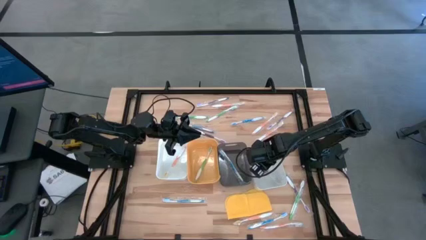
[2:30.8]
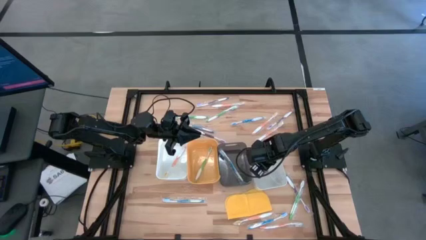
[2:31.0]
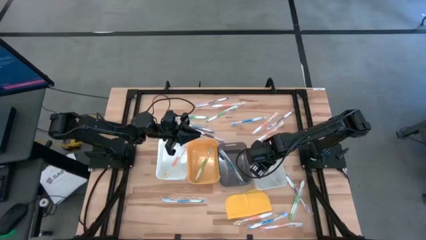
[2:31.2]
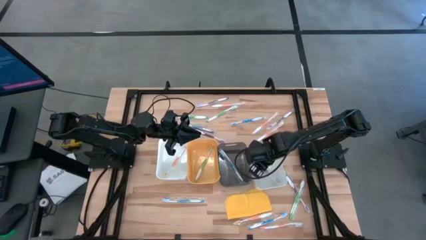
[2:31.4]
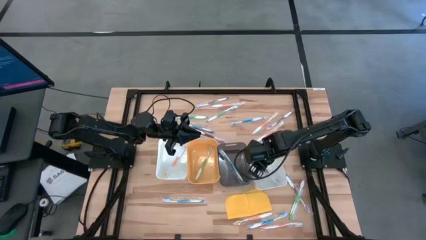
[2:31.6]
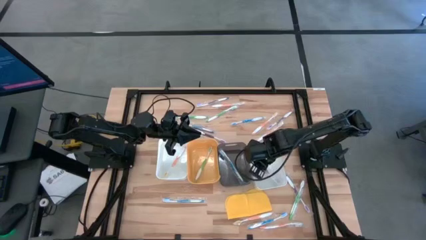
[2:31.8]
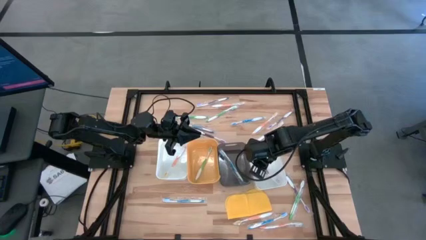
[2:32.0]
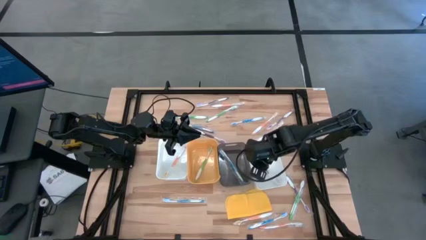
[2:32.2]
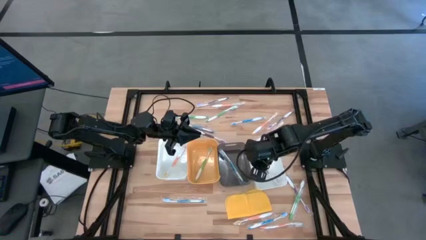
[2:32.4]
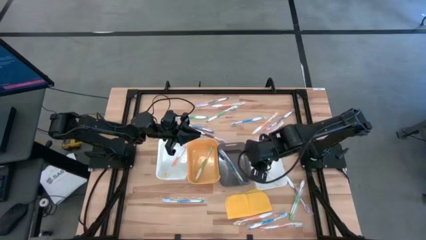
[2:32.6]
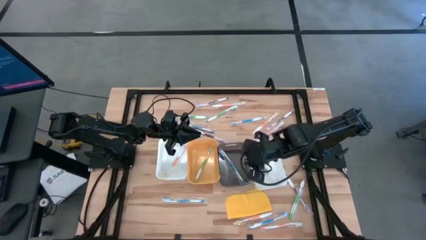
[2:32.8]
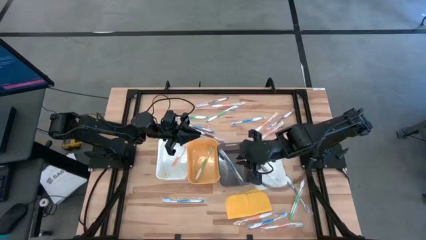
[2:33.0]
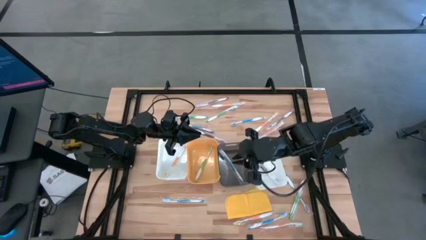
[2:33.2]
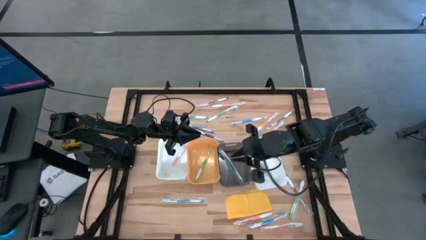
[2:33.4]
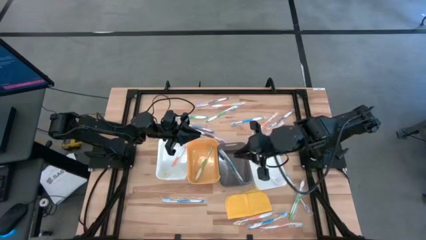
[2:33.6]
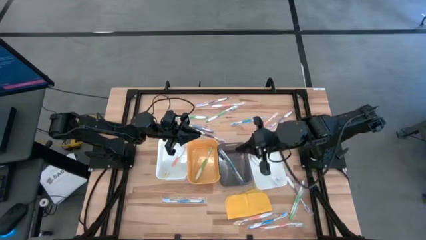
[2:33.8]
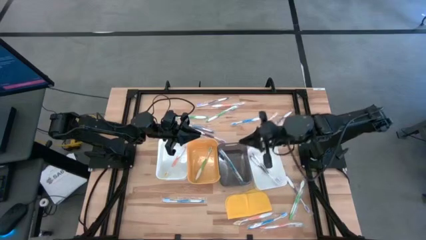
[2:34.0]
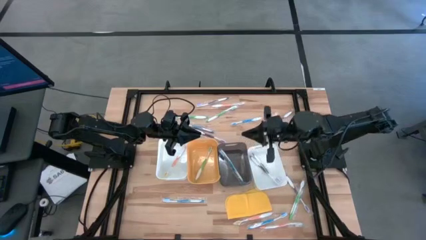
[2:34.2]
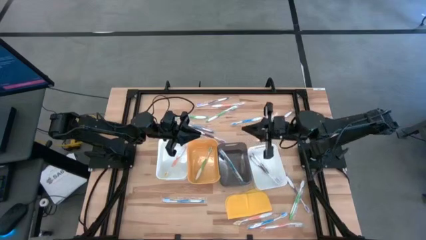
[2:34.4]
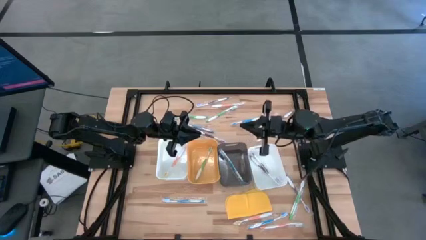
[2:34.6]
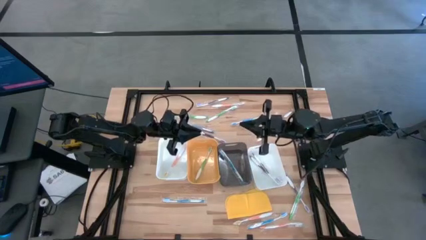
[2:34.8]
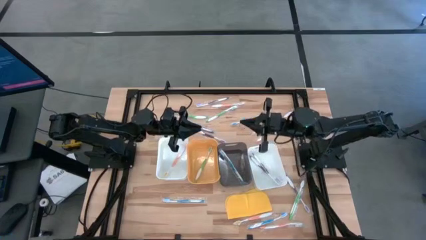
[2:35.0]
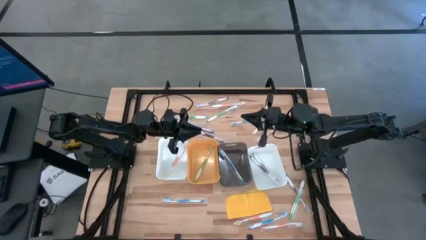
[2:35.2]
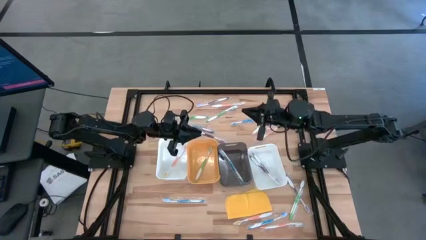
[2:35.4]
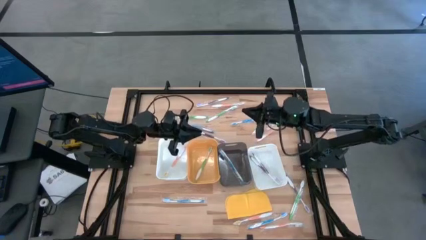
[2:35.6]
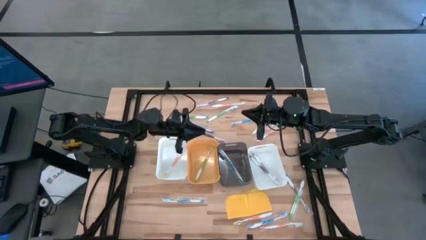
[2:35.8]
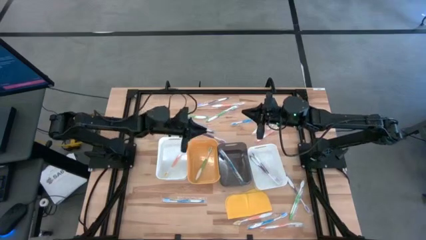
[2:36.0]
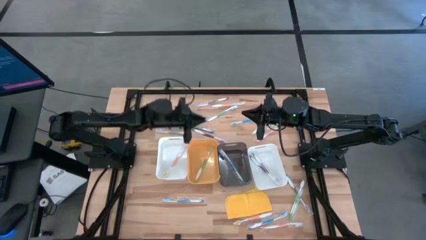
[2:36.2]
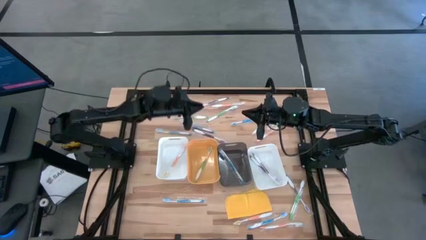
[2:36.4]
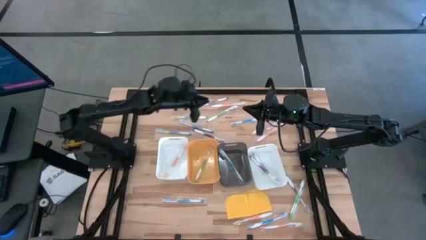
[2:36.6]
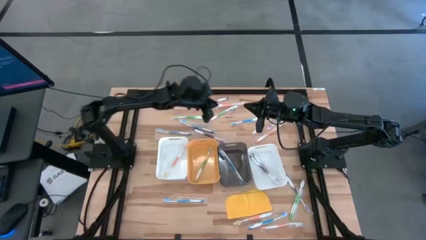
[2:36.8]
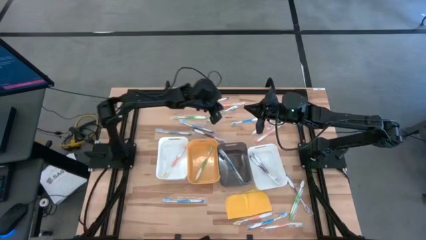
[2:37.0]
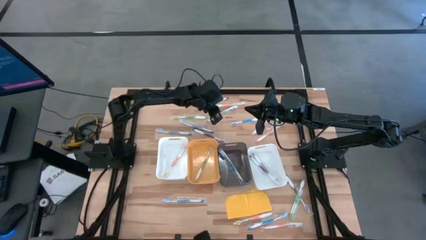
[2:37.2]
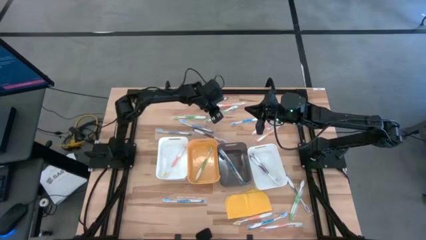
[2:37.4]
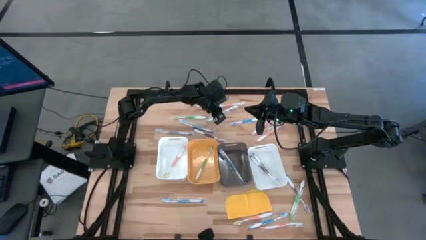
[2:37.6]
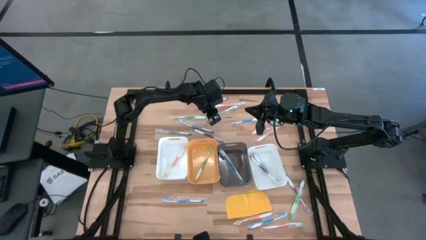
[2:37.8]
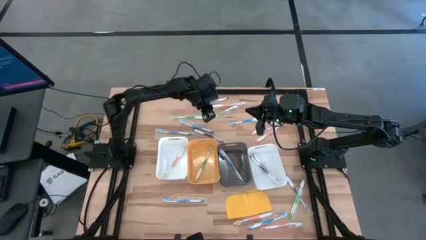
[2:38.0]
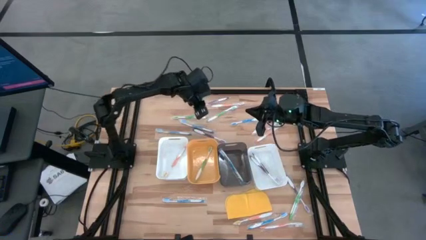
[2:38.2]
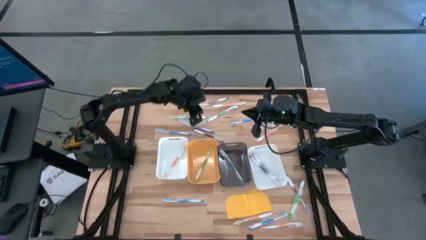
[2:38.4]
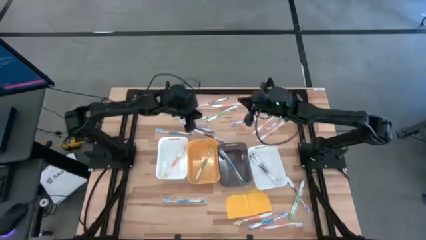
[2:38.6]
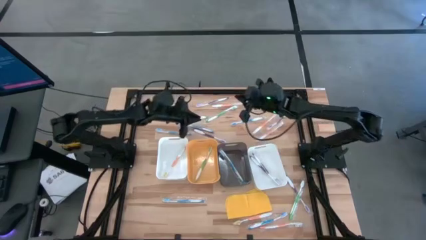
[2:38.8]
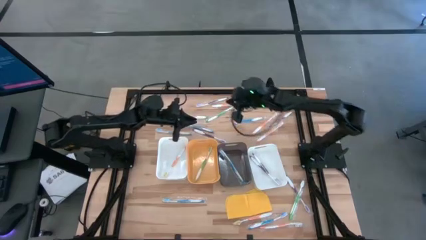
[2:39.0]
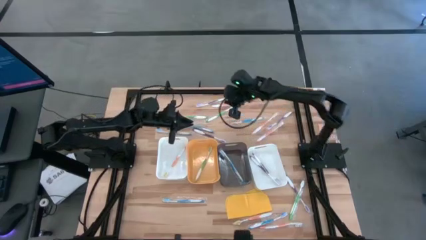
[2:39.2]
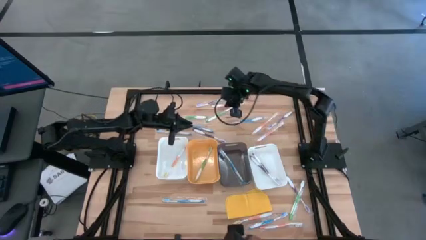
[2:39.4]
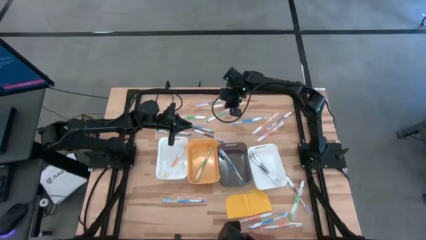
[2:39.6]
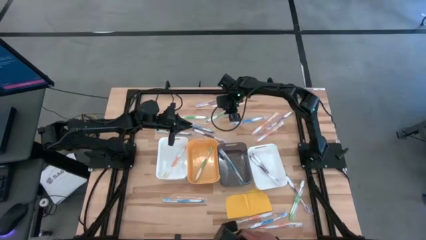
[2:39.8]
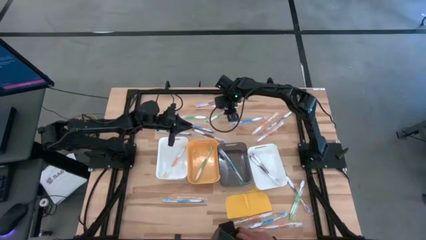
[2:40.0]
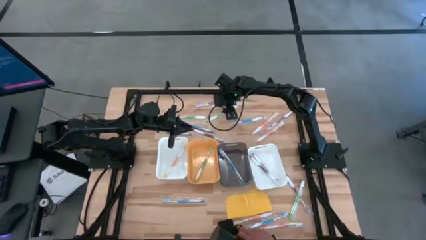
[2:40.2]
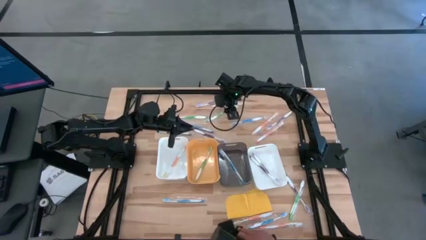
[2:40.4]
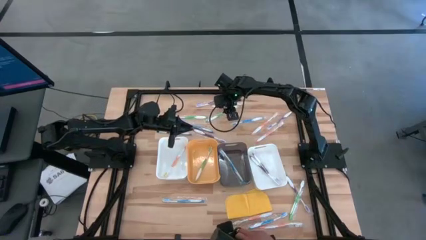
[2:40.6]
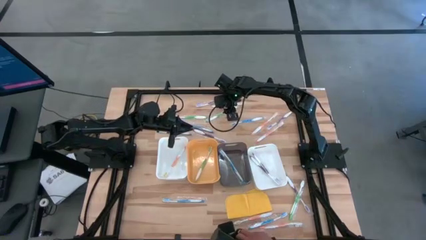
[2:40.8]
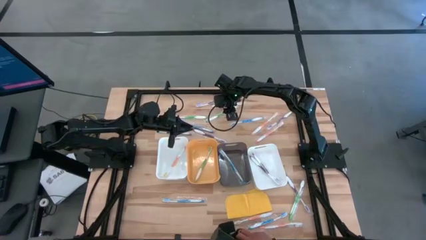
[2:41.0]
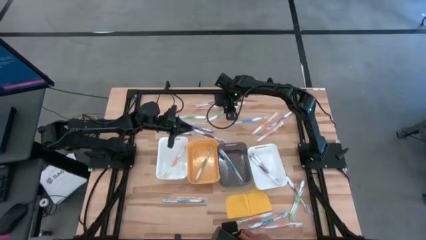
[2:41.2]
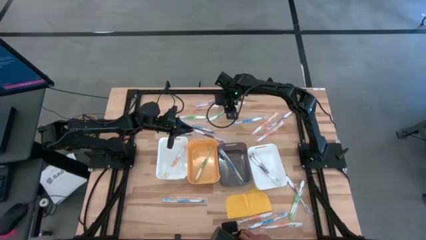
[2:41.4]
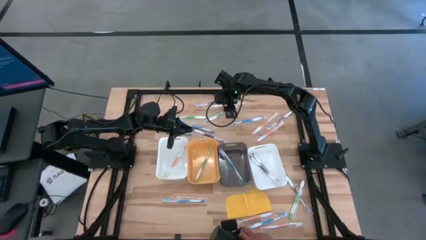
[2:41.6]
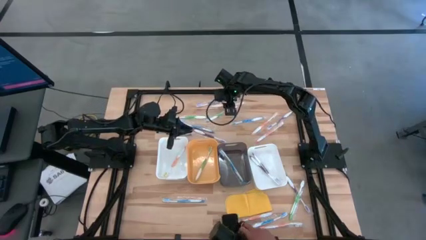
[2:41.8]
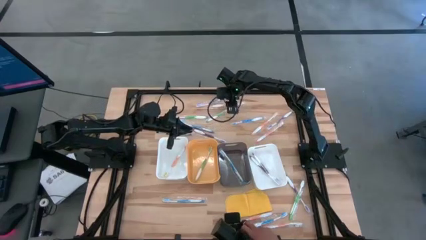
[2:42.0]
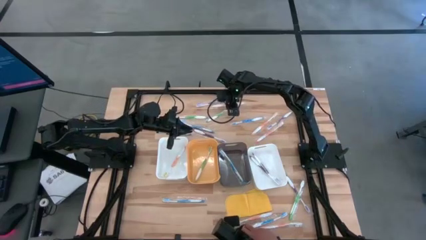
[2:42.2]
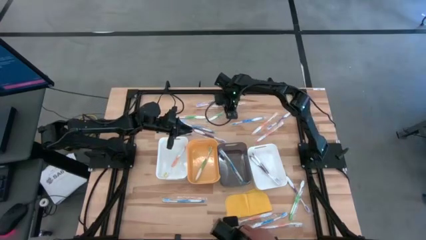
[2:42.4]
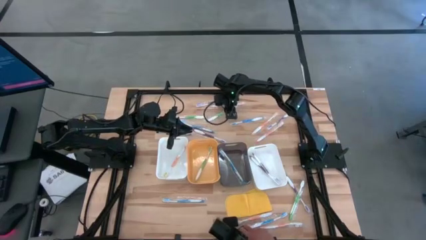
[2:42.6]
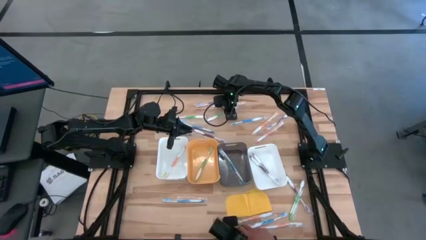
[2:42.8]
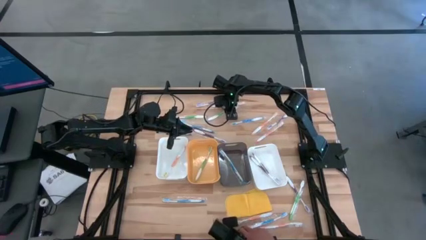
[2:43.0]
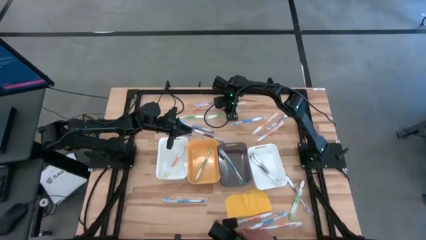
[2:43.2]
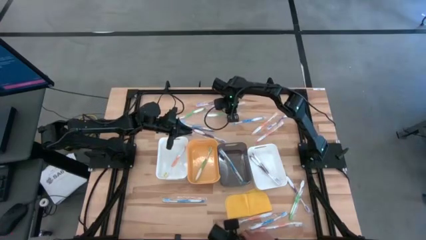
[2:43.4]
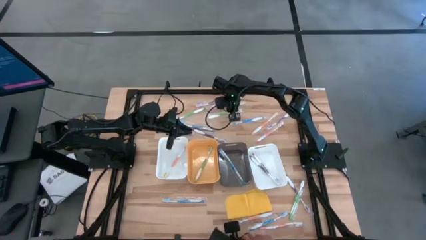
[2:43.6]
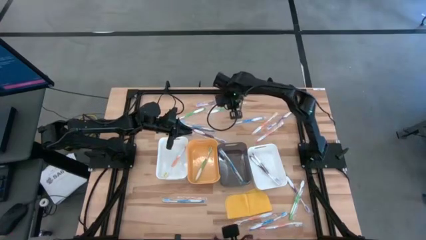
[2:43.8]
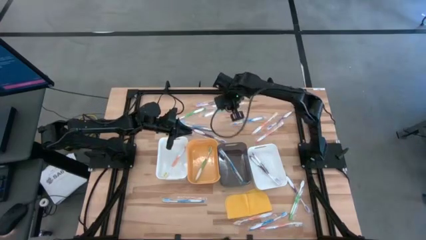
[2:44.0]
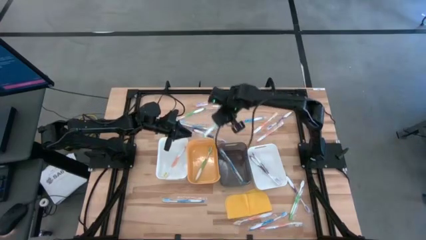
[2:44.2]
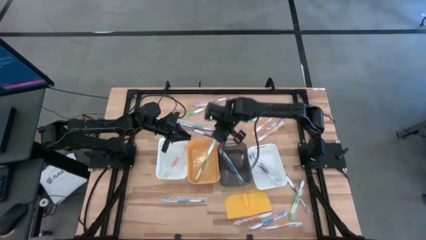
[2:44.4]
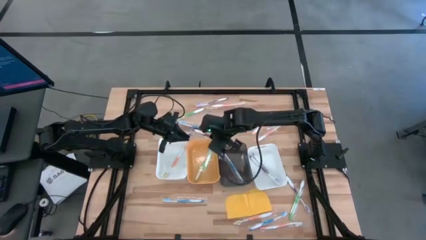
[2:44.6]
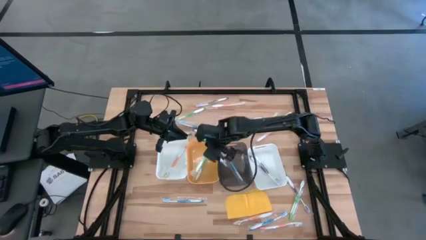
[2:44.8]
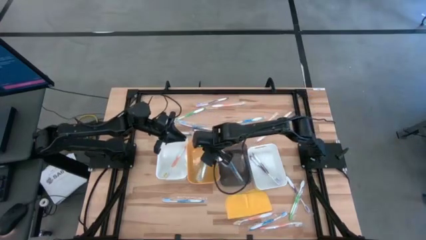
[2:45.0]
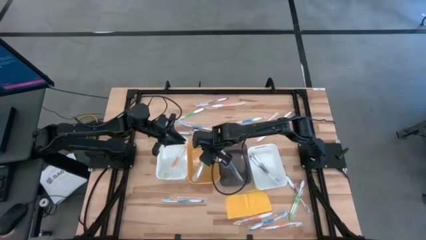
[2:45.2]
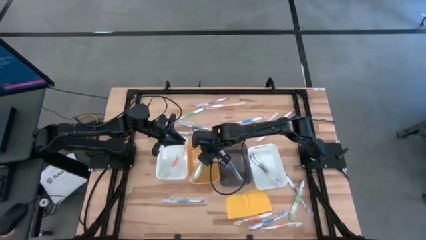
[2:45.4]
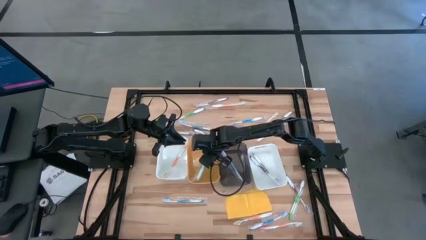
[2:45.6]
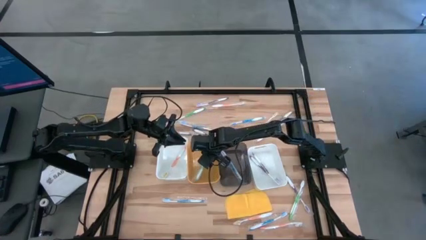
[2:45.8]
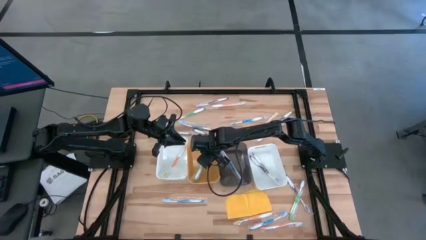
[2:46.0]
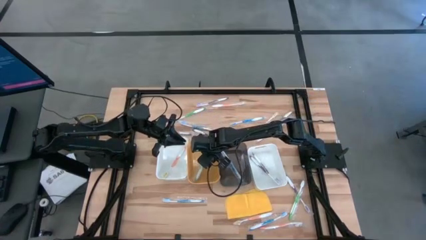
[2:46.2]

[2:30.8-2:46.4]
Task: Pick & Place Toothbrushes
Put the green toothbrush into the yellow bin
